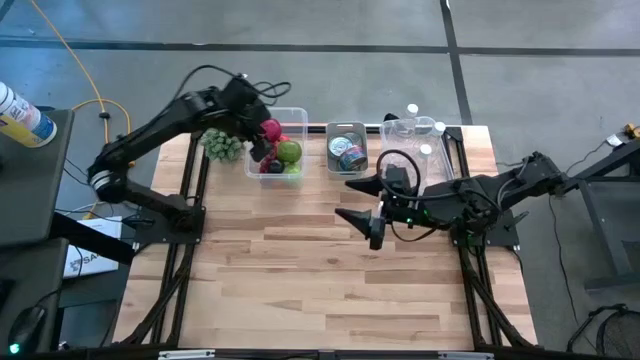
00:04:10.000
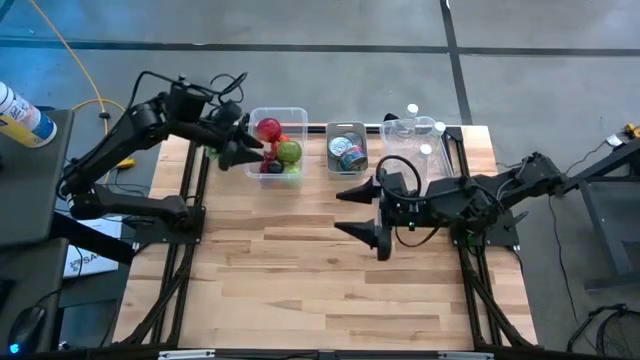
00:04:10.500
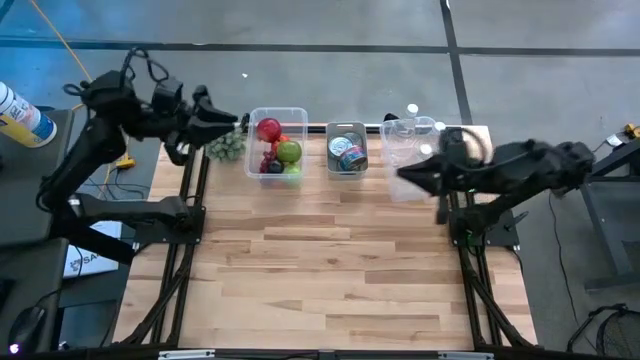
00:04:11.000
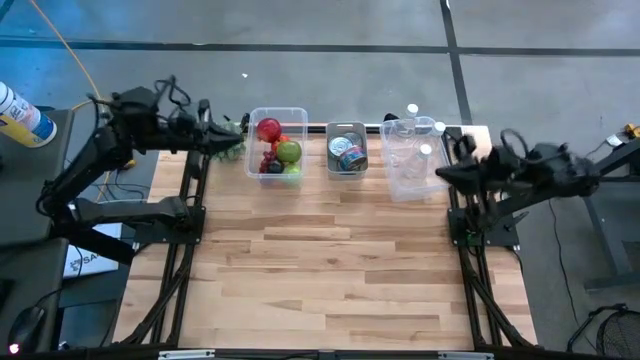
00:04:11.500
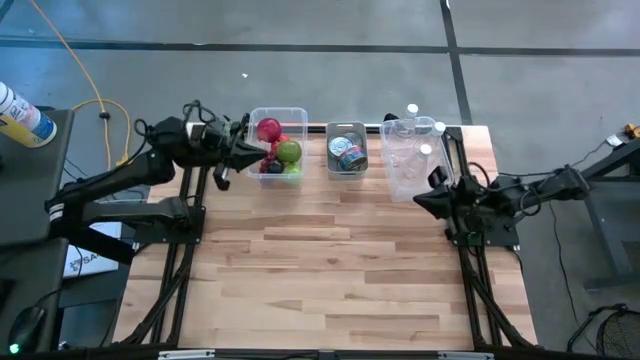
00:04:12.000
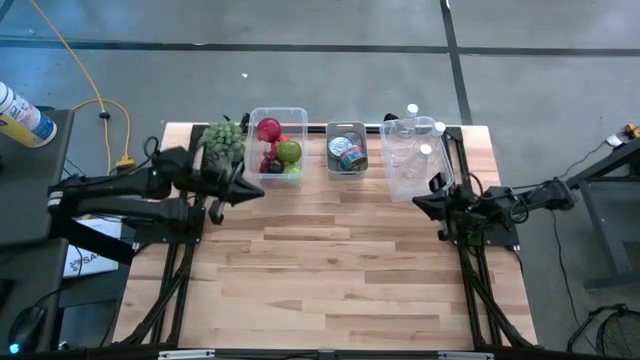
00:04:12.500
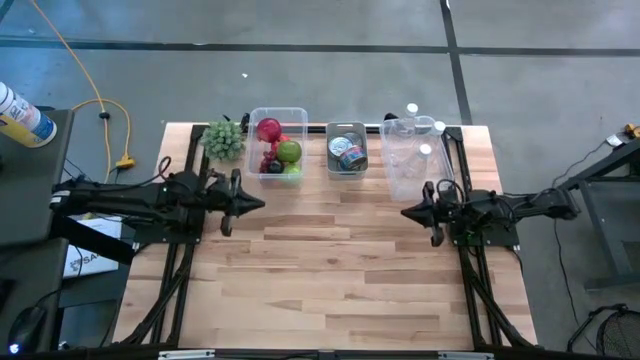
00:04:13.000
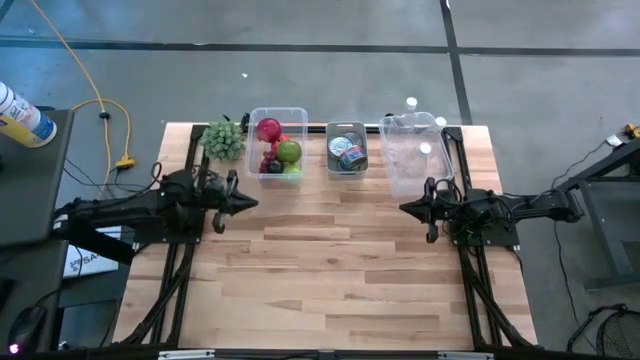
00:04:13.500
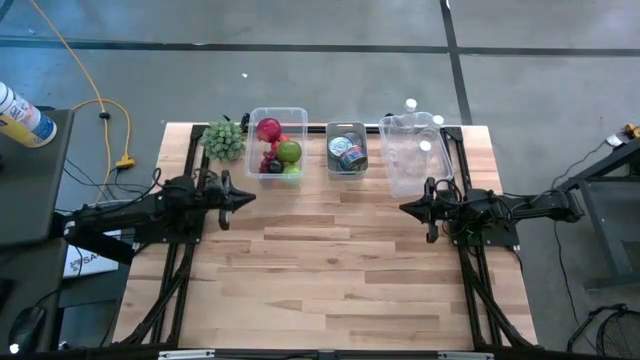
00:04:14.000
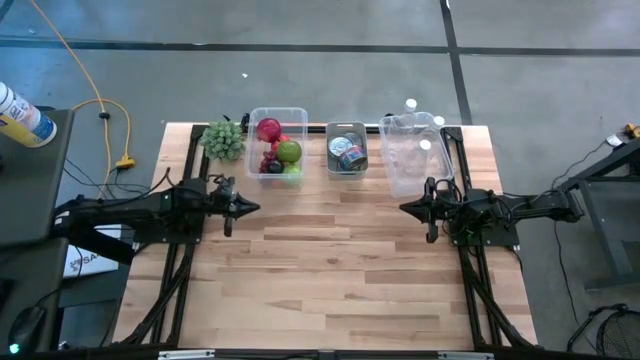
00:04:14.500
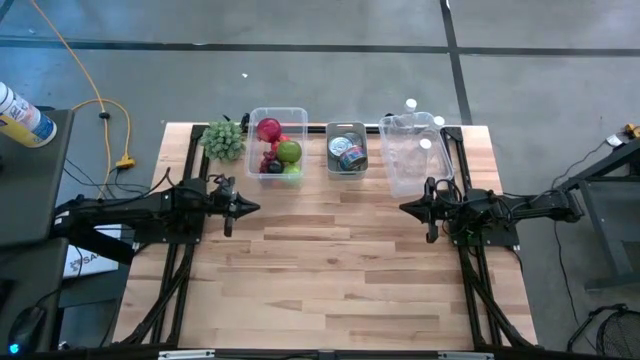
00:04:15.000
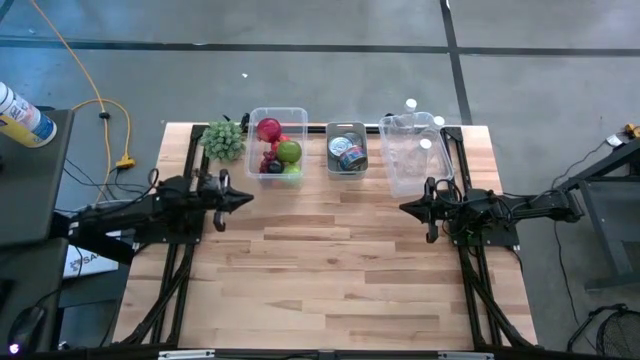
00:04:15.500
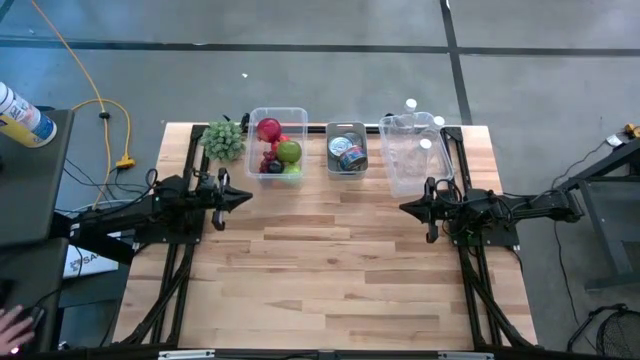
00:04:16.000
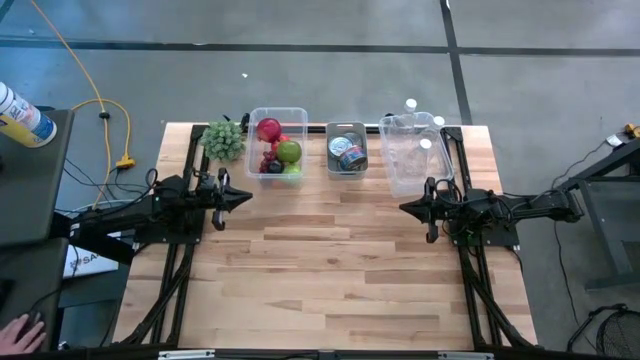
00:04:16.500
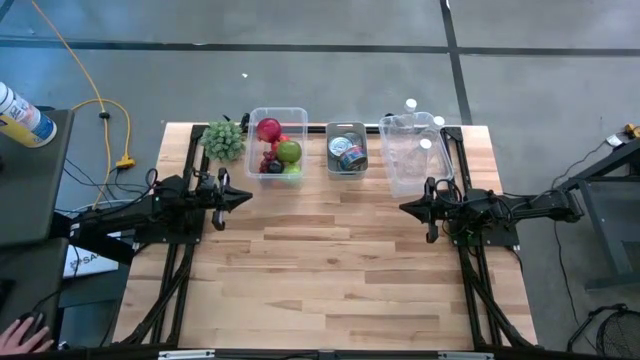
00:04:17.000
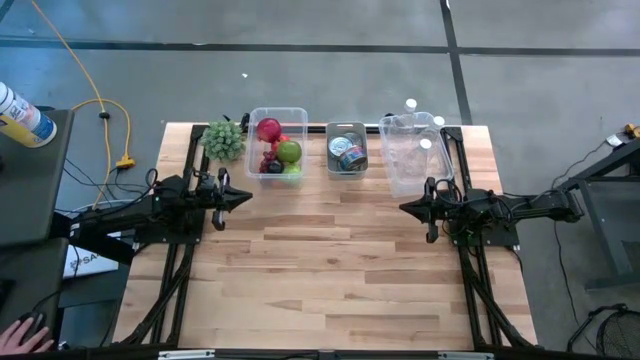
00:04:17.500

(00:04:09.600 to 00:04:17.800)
Task: Pick & Place Food Item
Return to Home Position

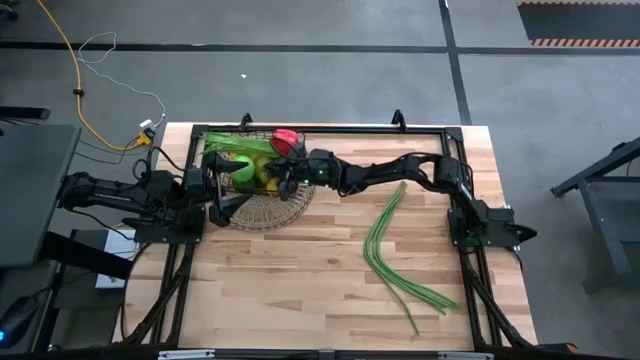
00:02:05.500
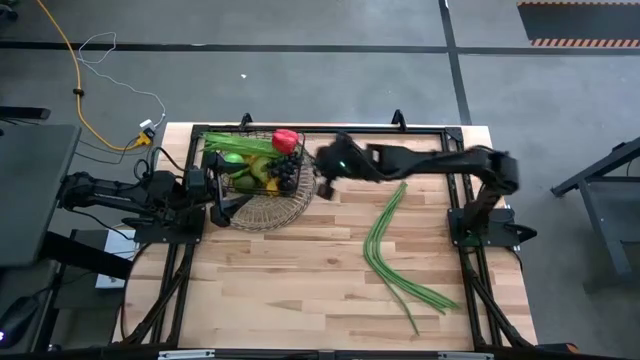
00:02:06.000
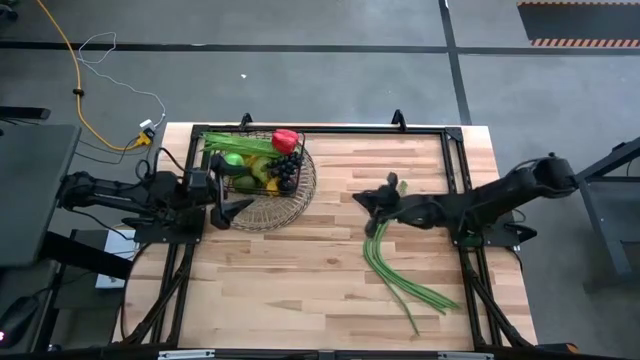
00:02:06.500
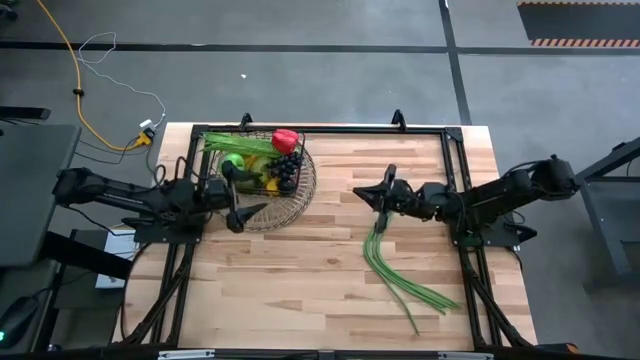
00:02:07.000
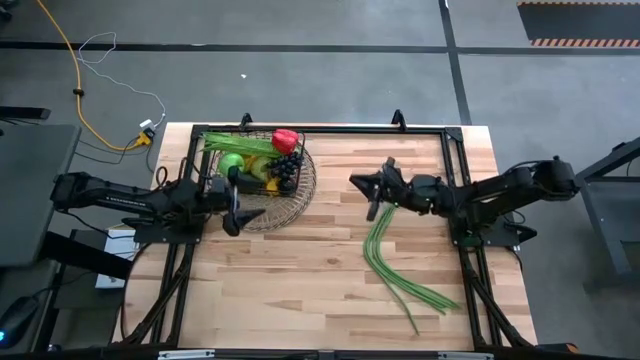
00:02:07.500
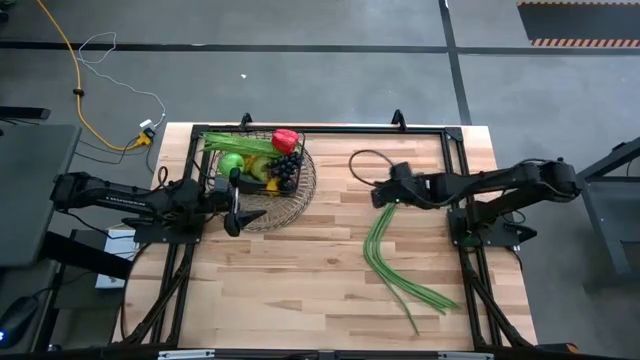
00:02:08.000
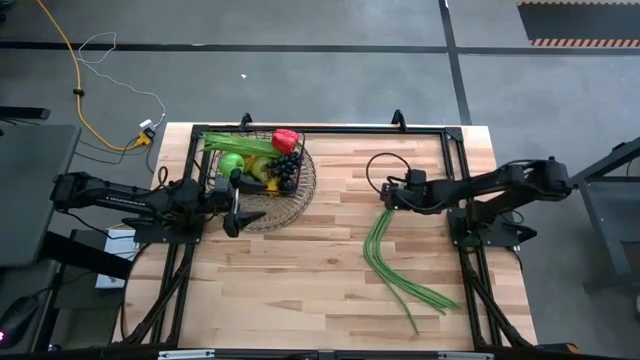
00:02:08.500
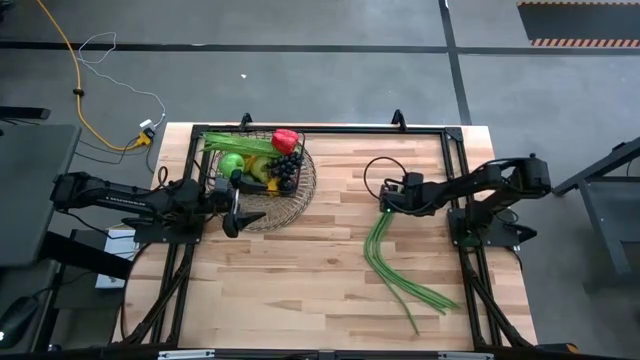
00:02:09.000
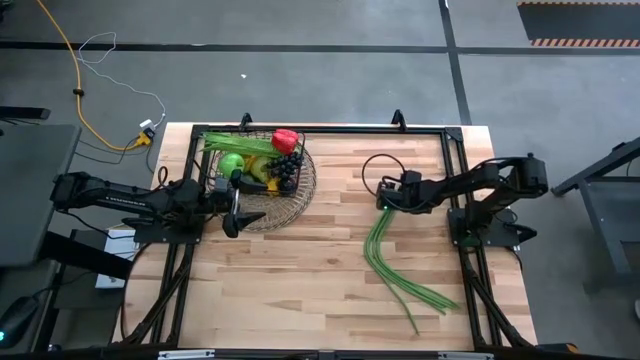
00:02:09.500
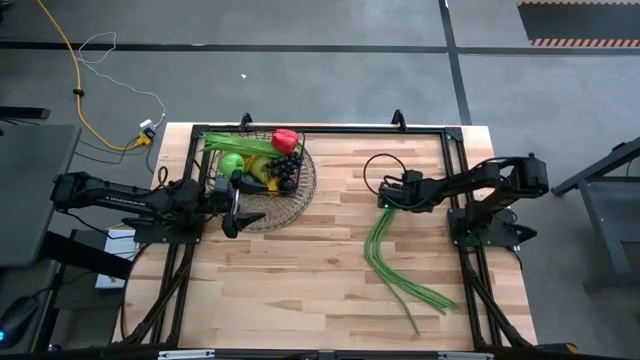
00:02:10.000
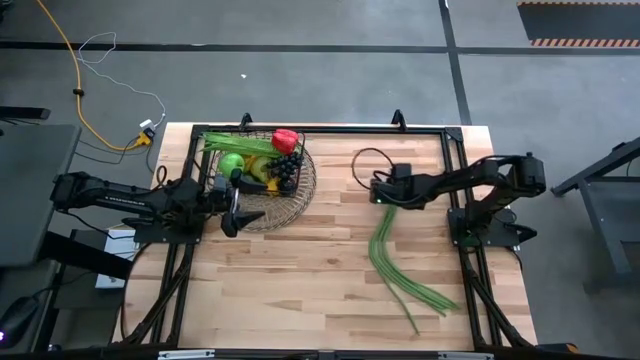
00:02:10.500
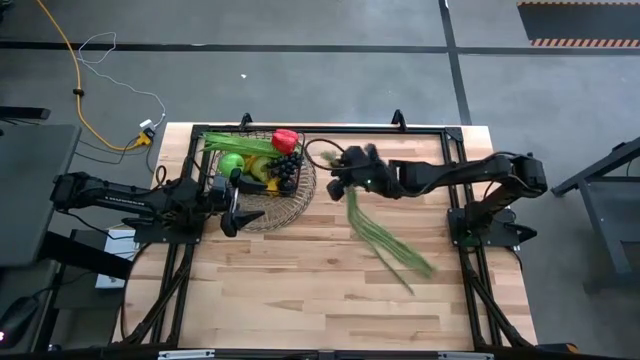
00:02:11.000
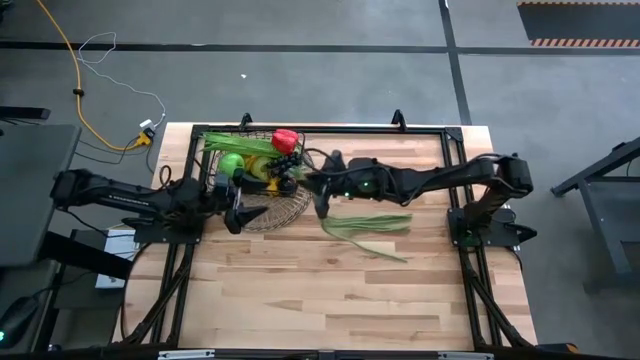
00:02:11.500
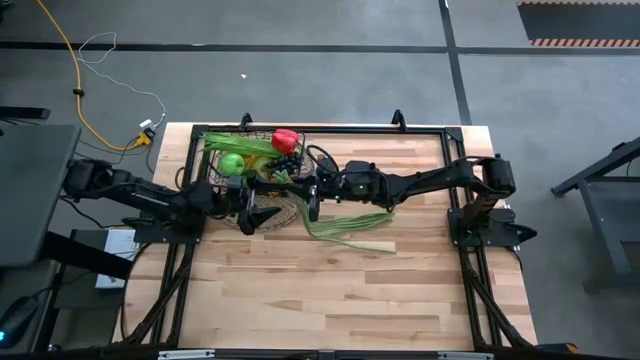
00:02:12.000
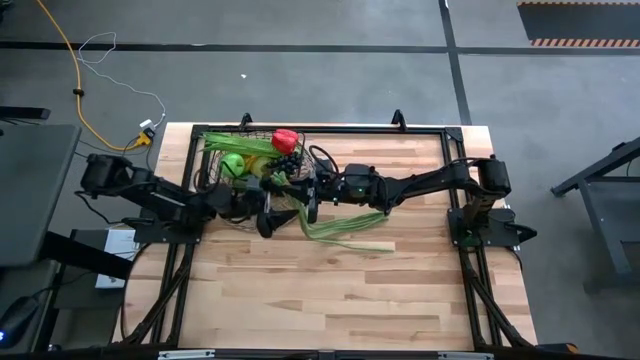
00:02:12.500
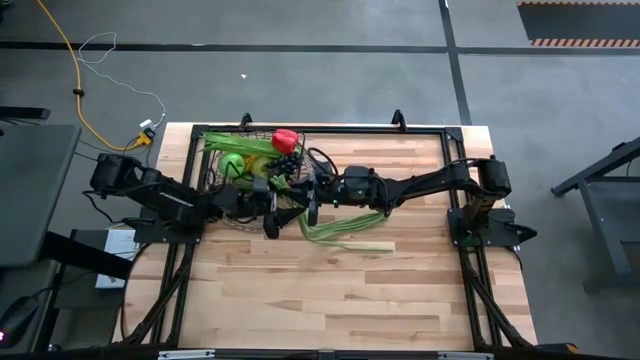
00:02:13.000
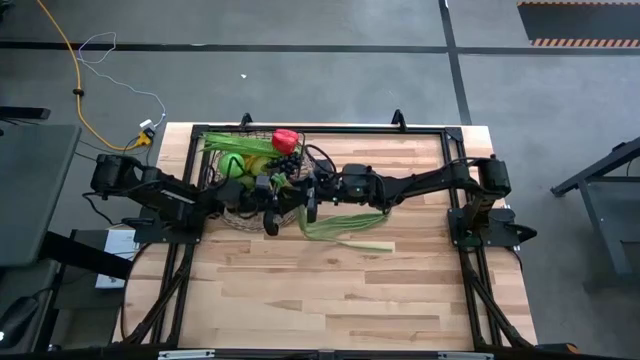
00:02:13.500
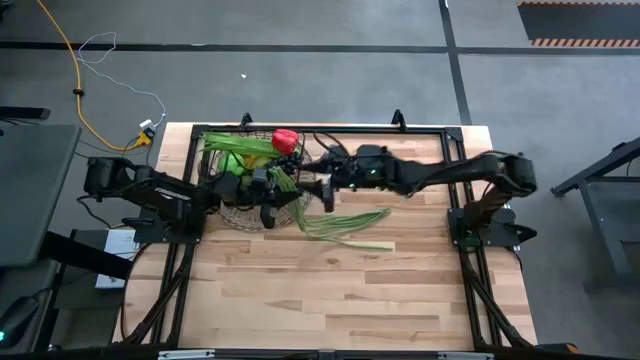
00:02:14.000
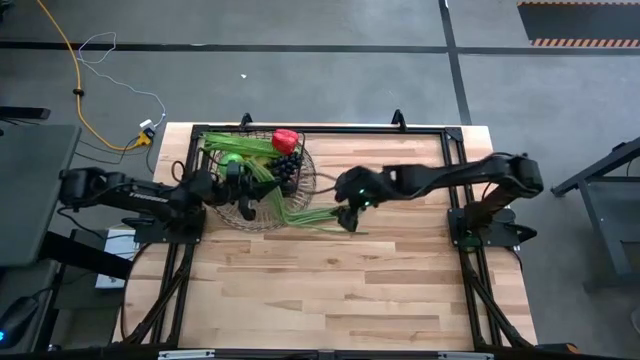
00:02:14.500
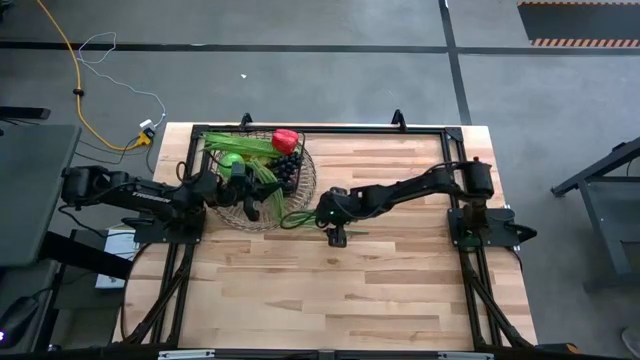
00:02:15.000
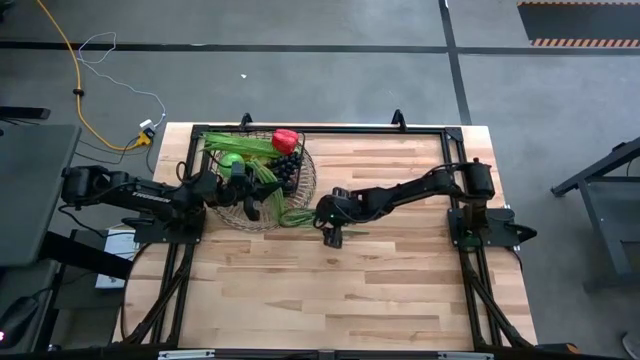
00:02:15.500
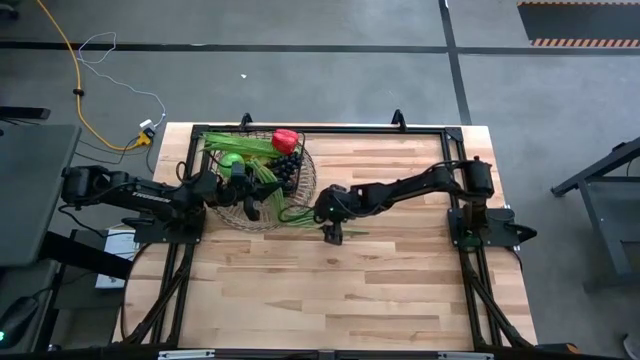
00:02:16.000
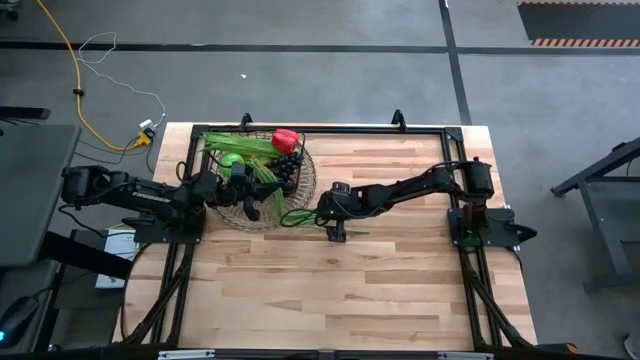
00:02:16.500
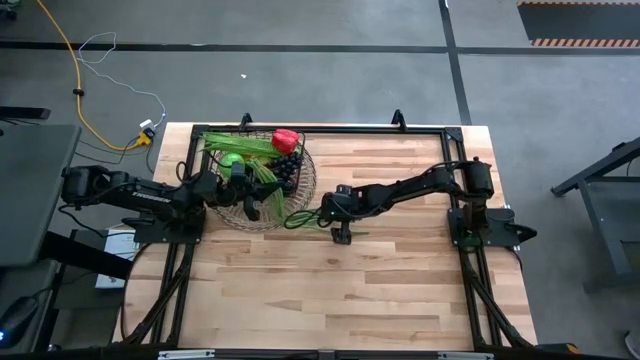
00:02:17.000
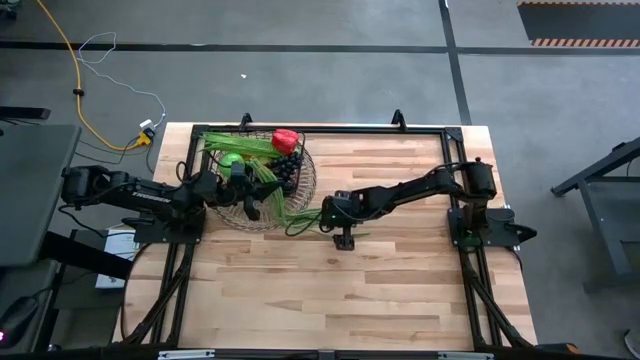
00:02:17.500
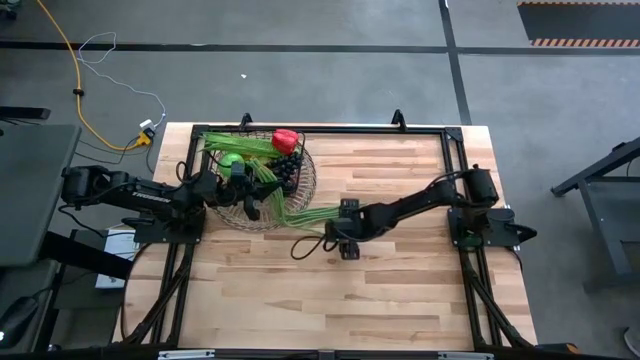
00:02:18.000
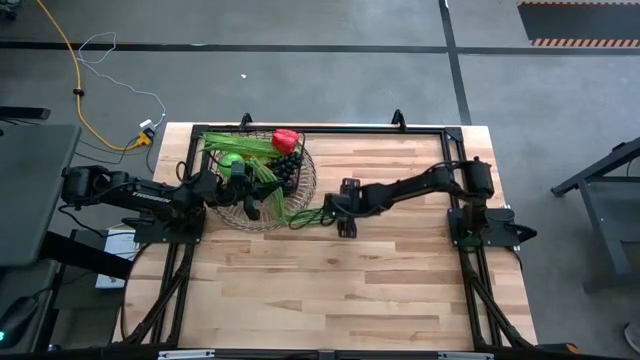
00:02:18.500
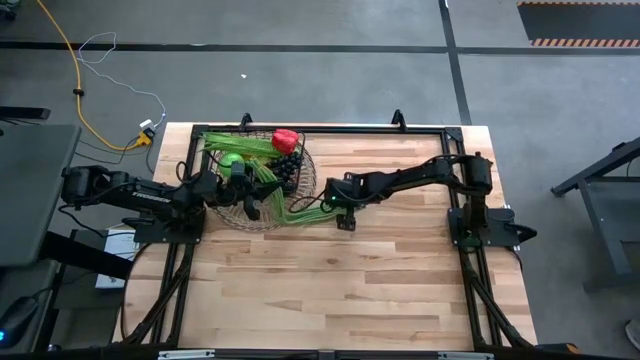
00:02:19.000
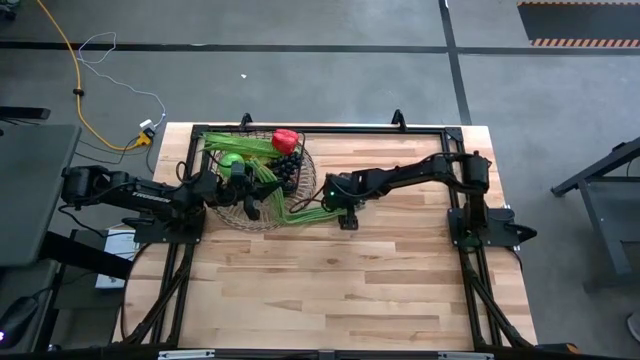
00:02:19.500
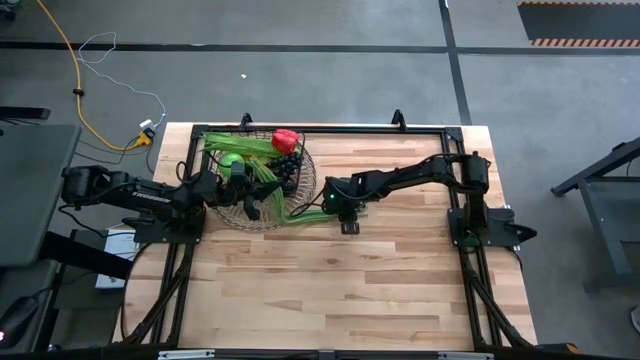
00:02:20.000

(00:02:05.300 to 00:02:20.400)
Task: Build produce basket
Put the green beans into the wire basket
